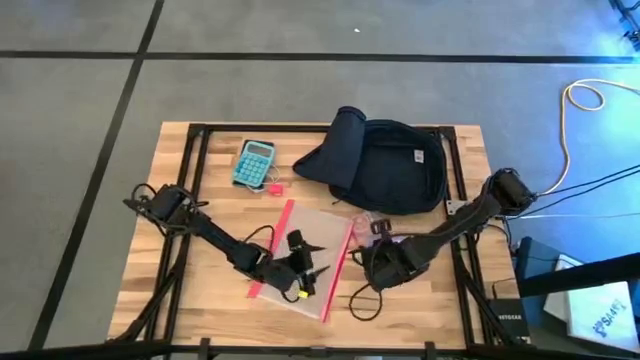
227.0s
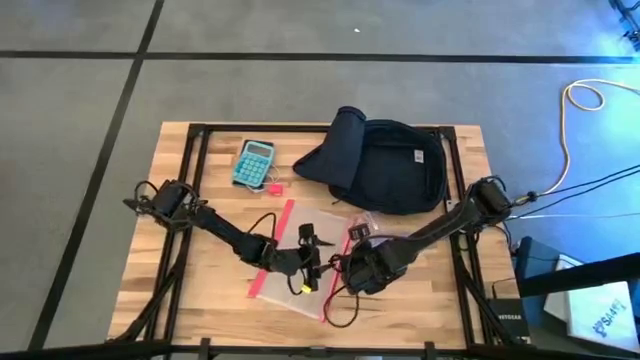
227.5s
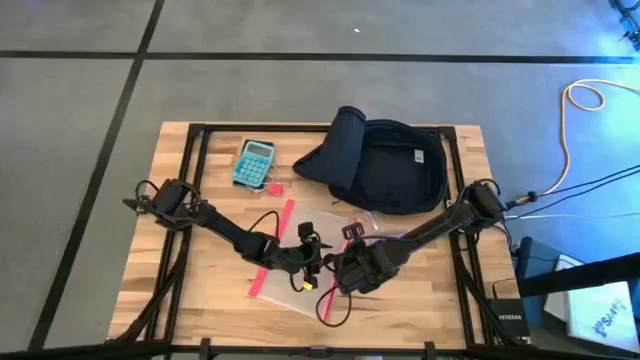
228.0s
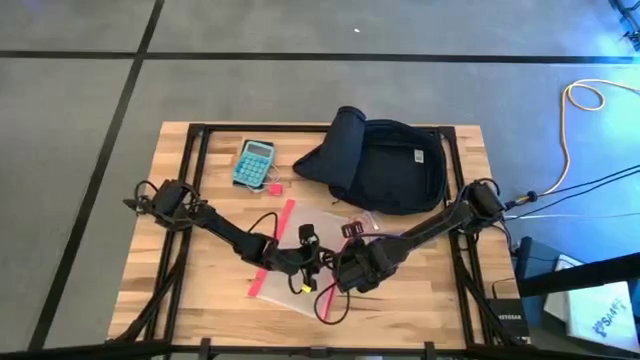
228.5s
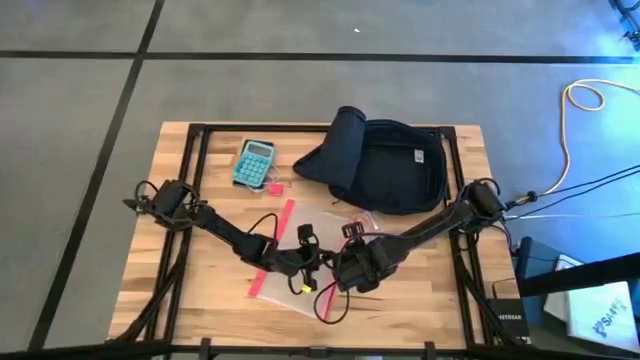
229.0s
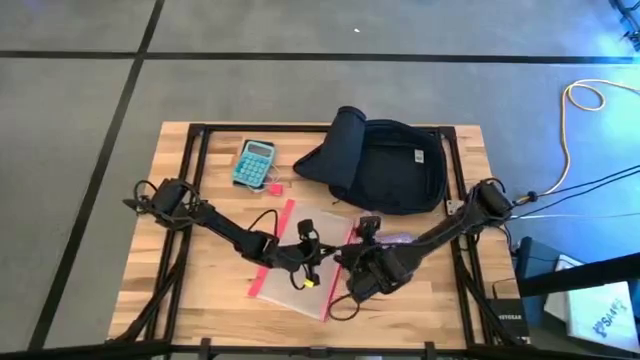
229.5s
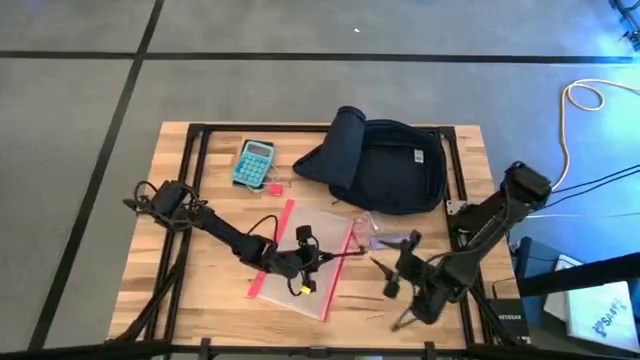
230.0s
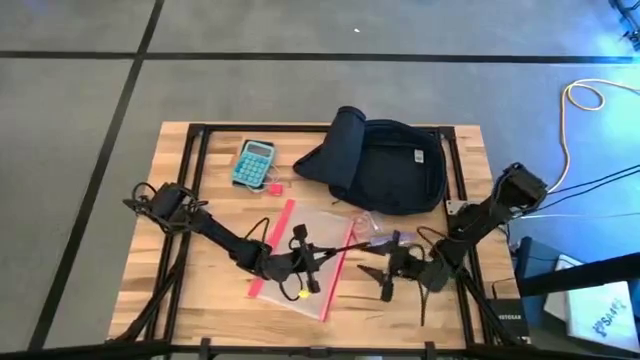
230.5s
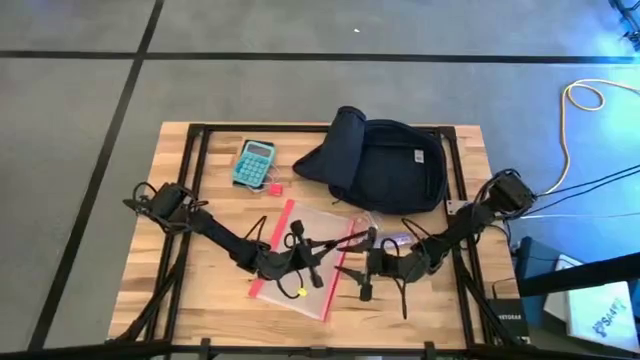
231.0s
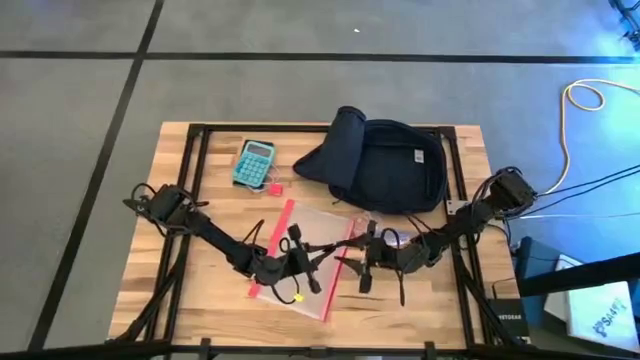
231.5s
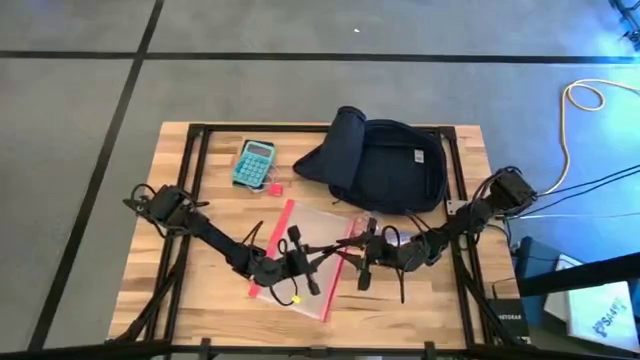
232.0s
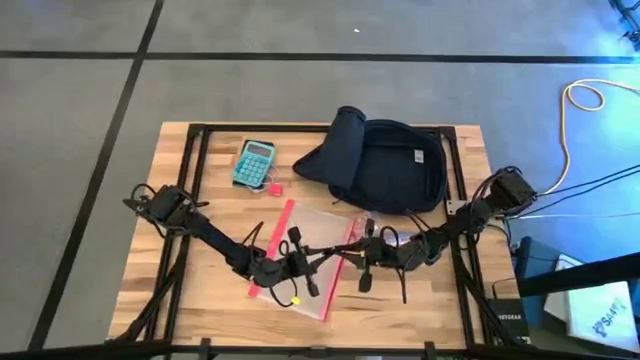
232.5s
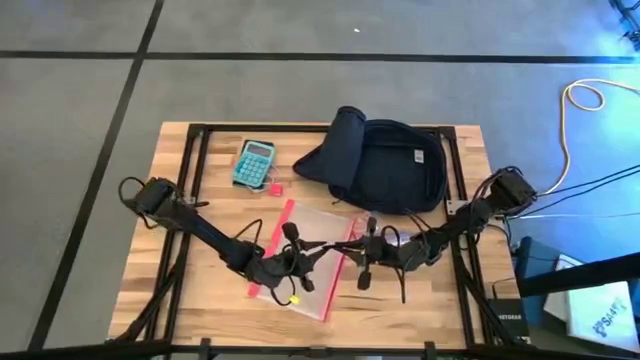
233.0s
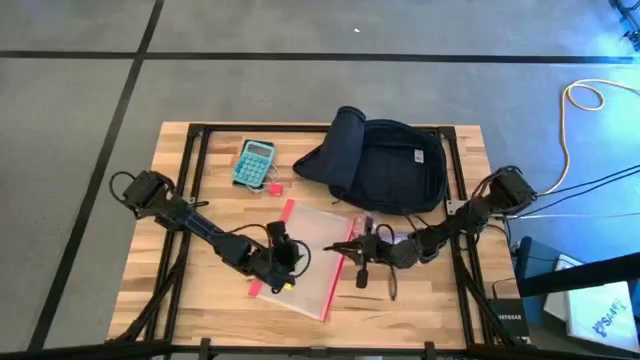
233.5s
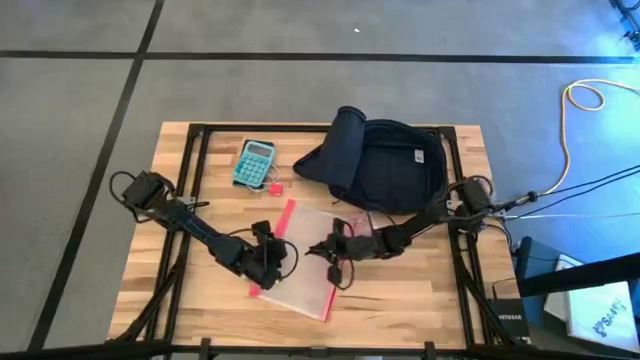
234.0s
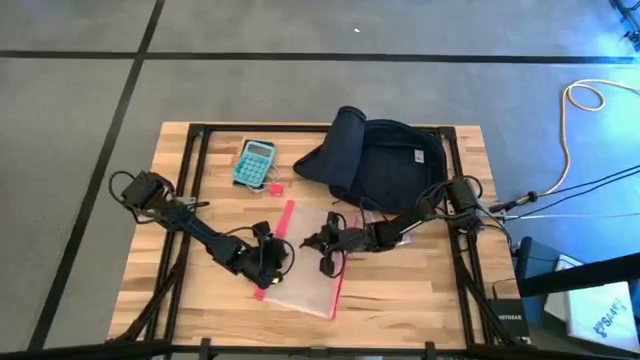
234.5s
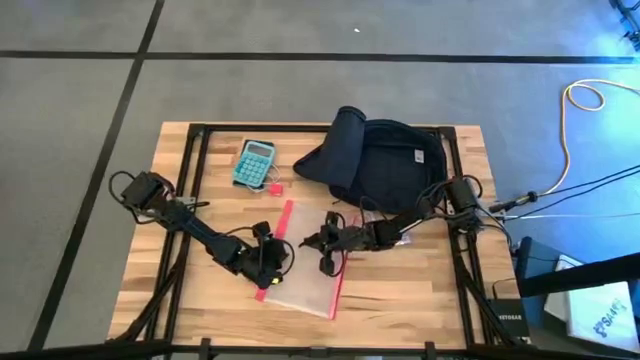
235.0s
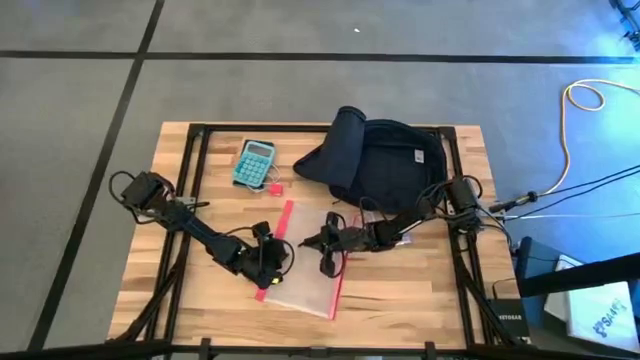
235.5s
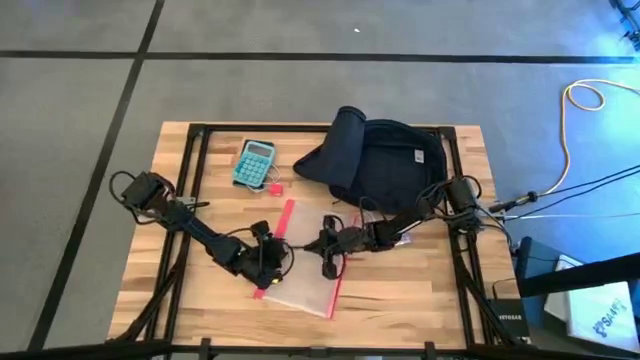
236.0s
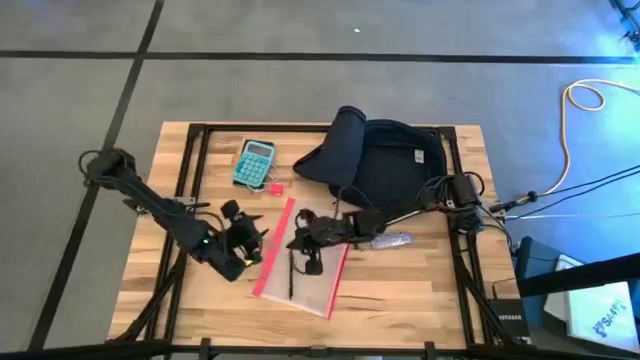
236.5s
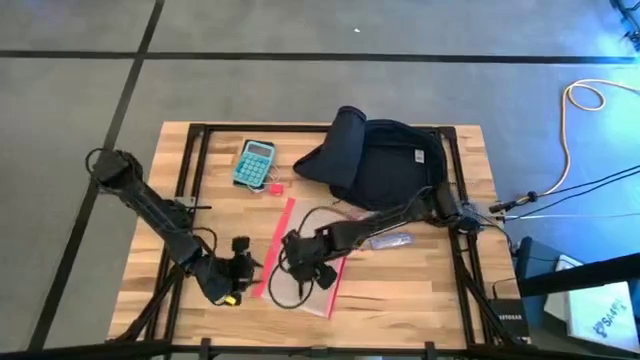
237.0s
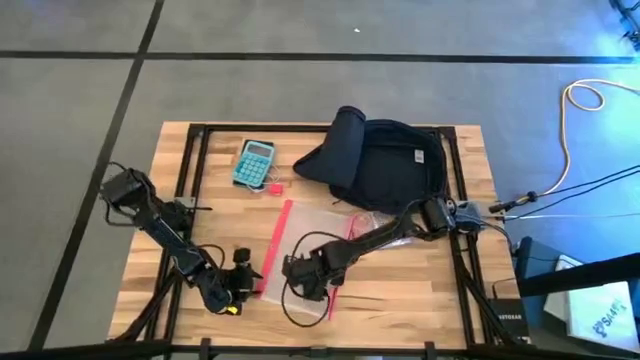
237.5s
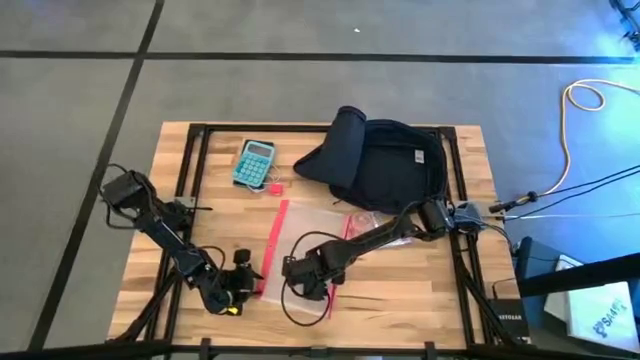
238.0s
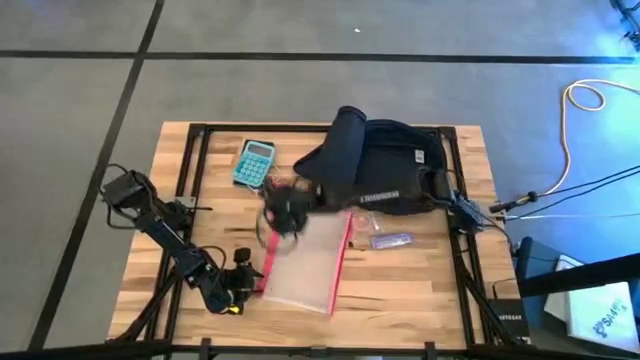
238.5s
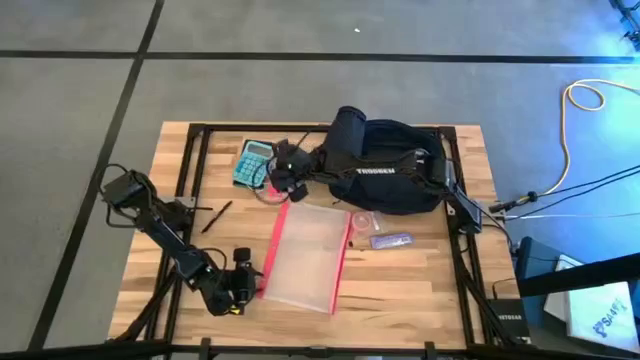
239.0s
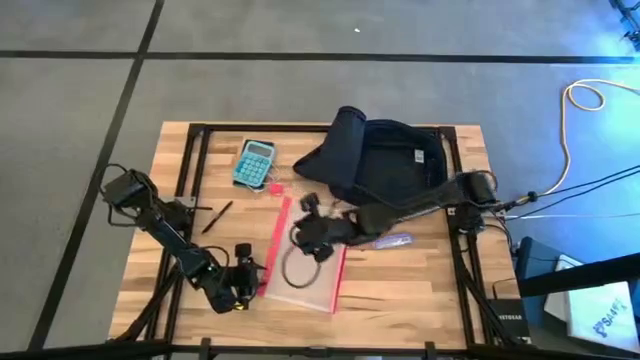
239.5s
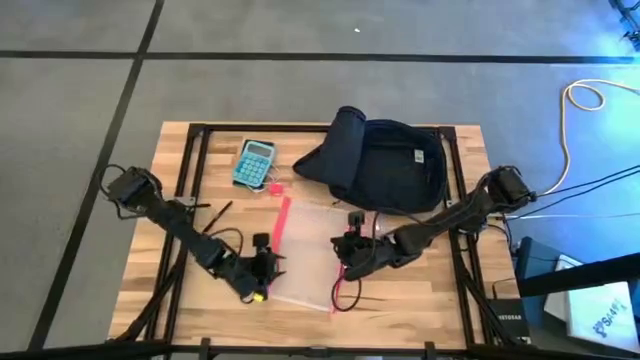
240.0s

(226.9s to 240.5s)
Task: Unpack backpack
Remove the black pen from the transparent zip bag

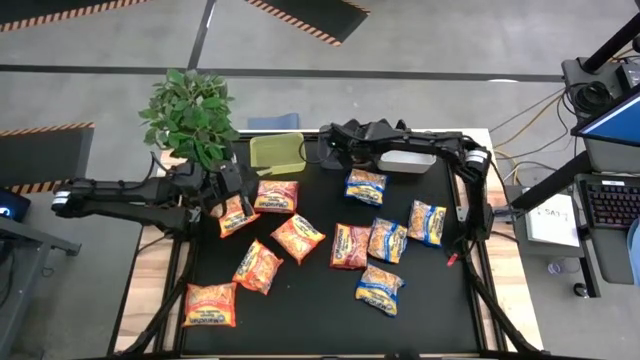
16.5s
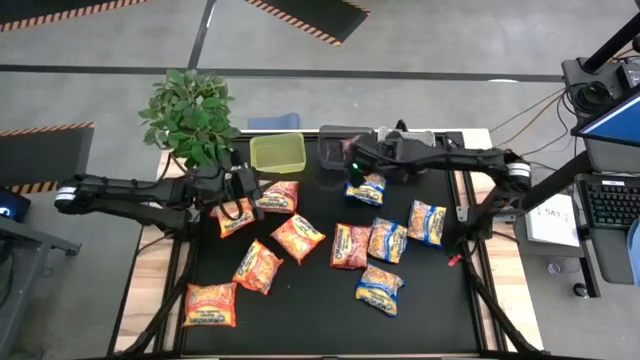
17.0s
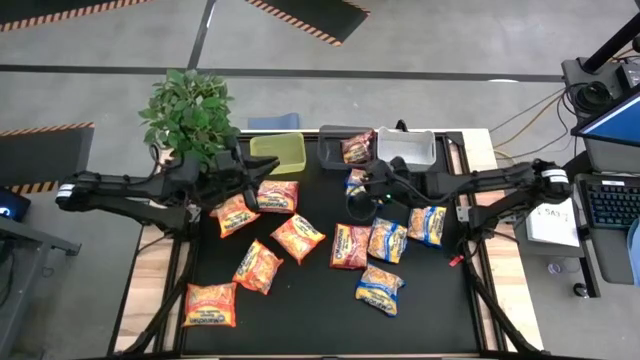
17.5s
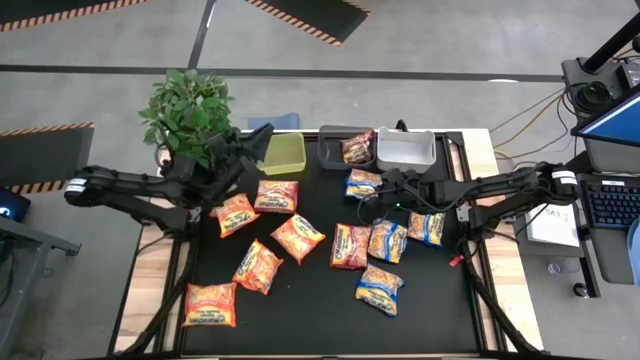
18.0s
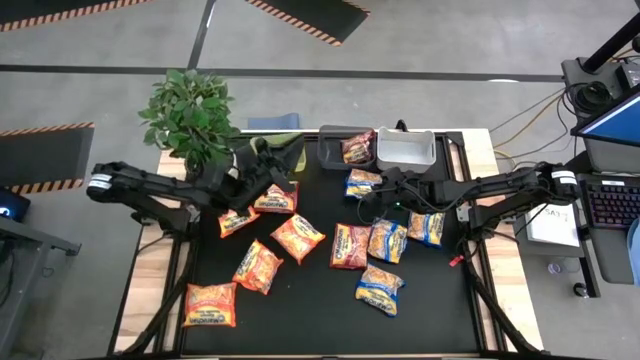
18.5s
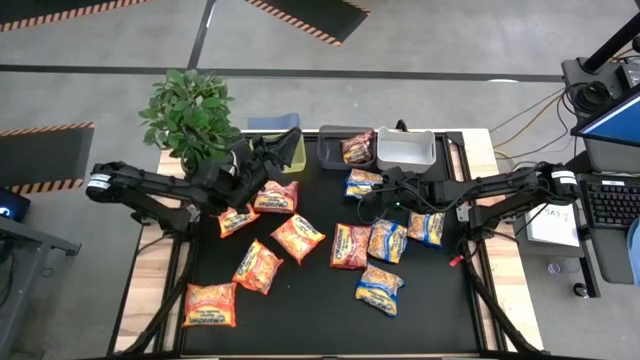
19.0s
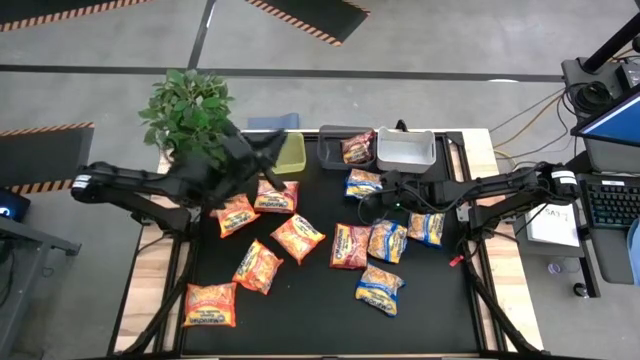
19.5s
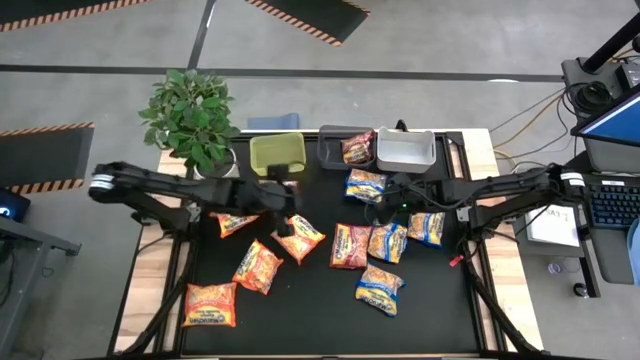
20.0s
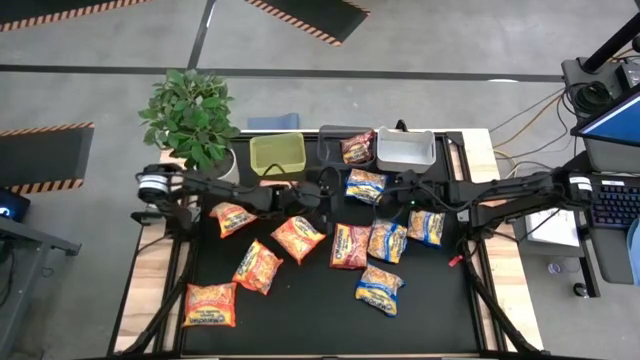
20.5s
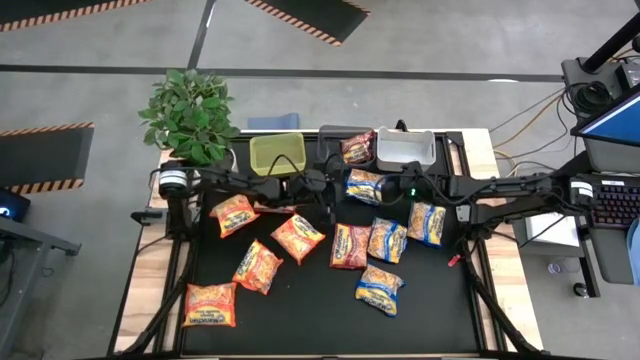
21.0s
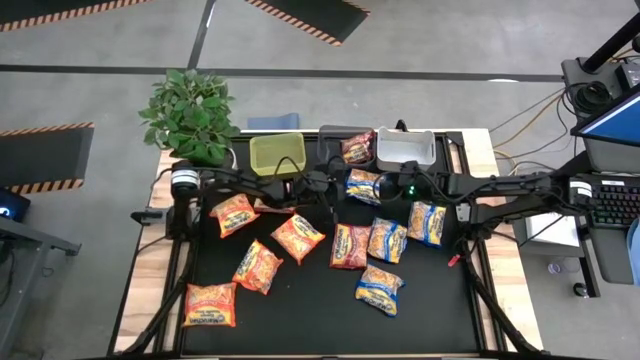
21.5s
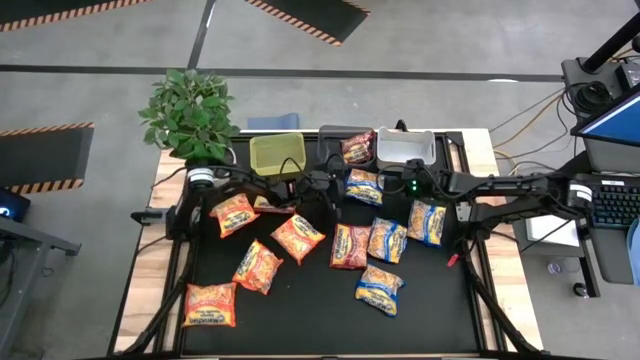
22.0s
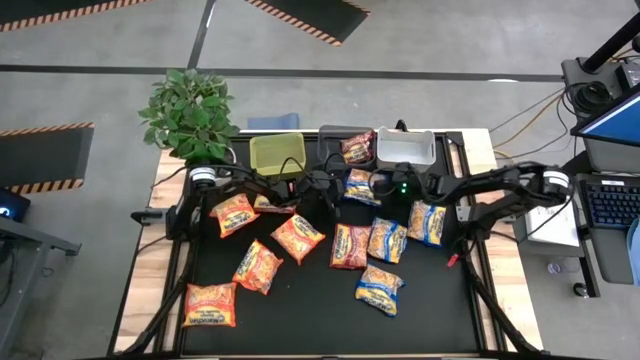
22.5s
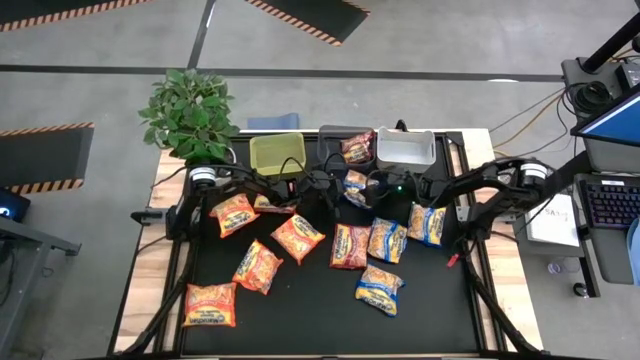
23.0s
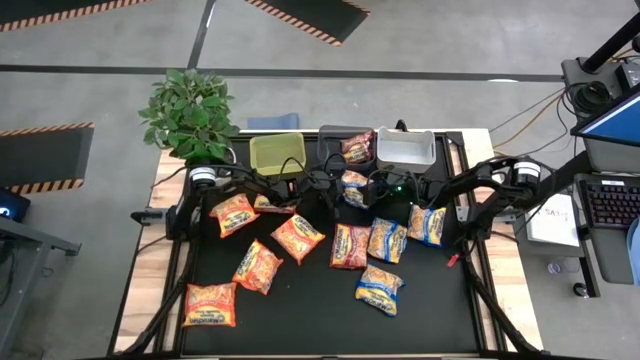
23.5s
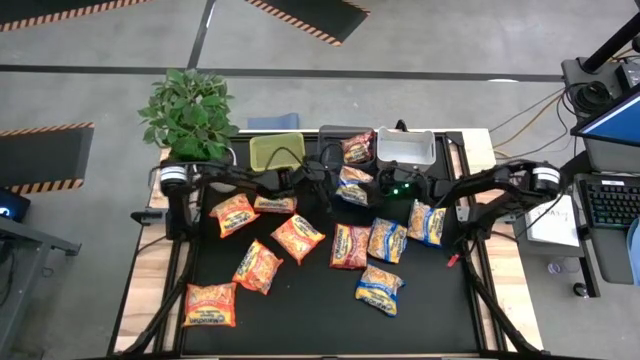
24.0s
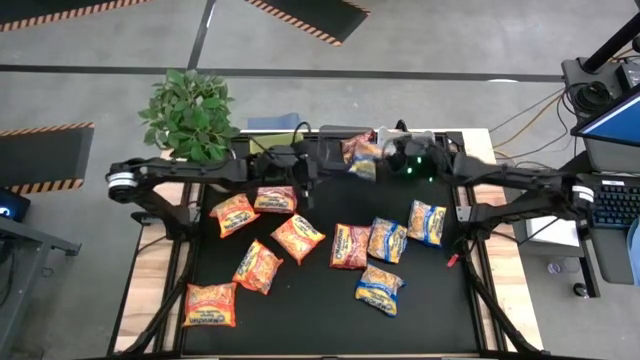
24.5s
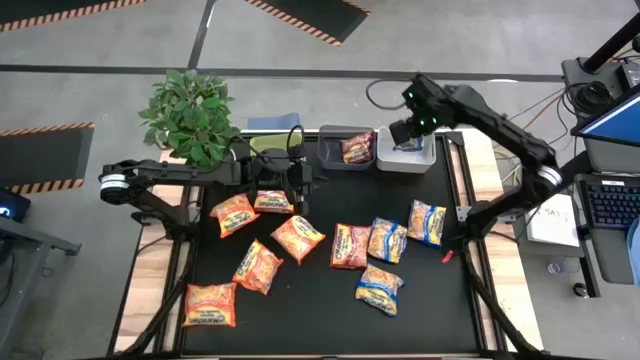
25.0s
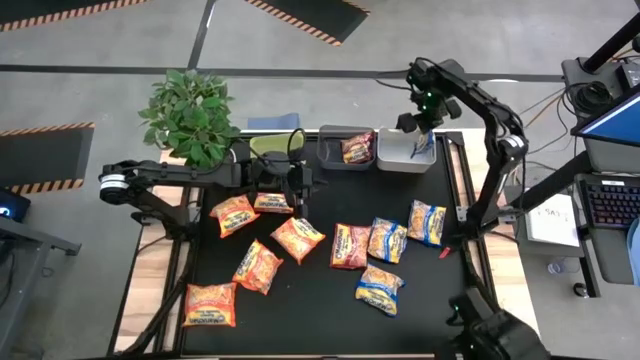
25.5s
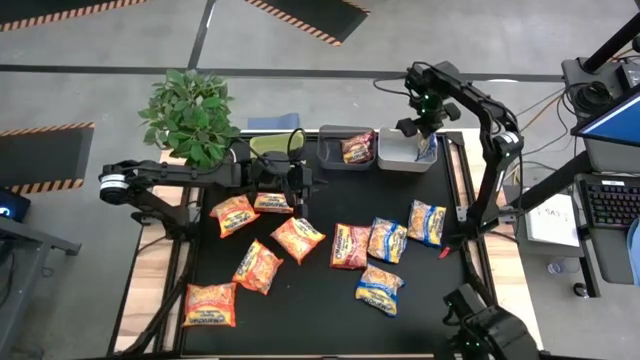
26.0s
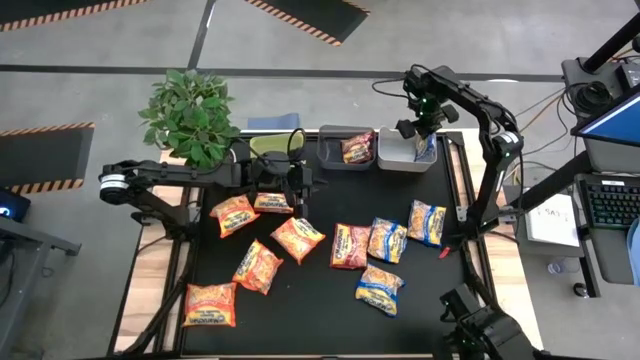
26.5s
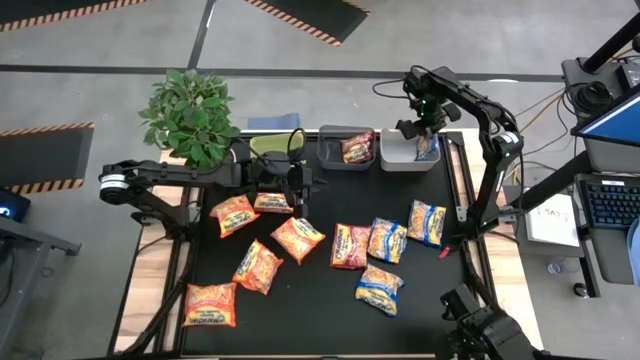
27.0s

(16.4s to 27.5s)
Task: Sort Maruchan noodles
Put the blue noodle pack into the white bin
